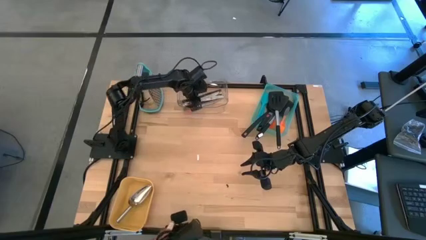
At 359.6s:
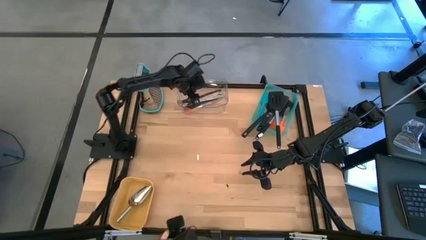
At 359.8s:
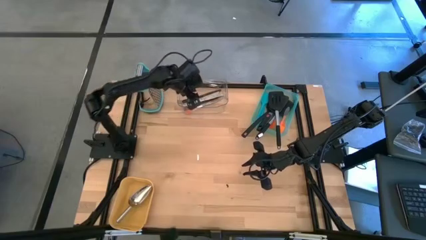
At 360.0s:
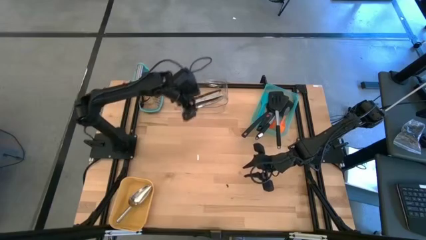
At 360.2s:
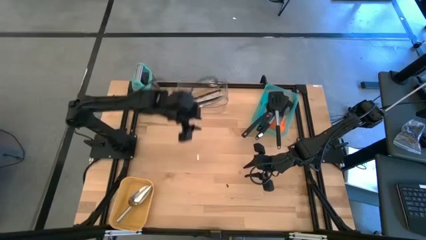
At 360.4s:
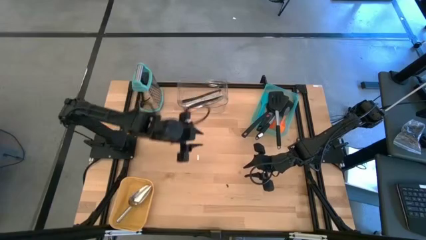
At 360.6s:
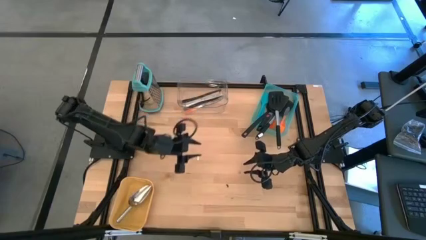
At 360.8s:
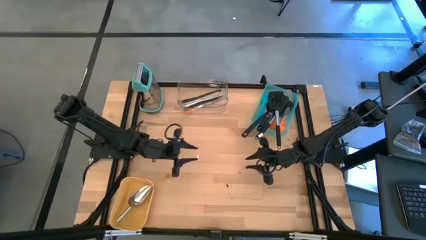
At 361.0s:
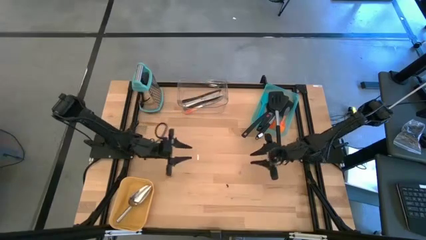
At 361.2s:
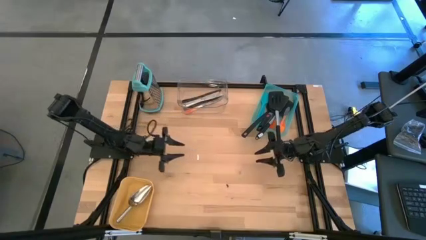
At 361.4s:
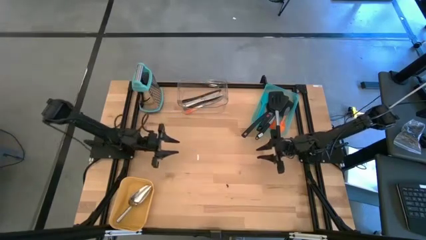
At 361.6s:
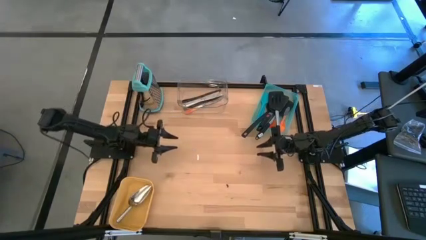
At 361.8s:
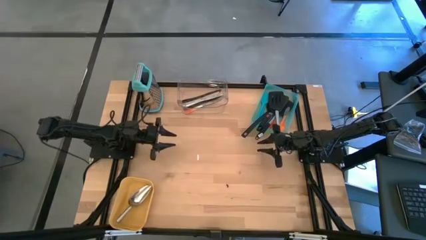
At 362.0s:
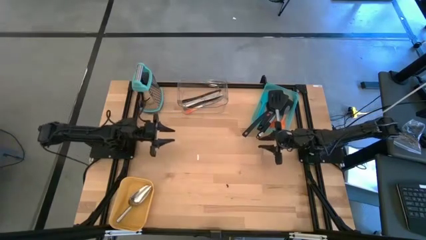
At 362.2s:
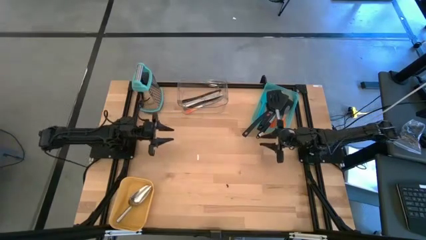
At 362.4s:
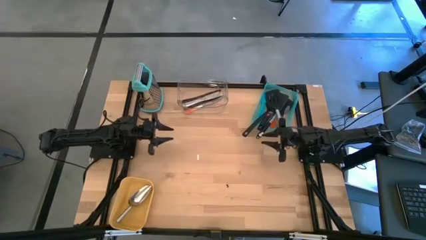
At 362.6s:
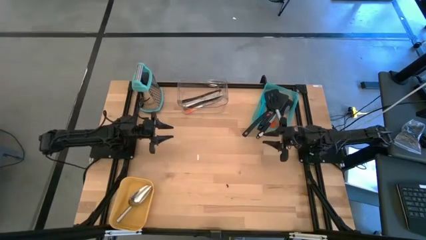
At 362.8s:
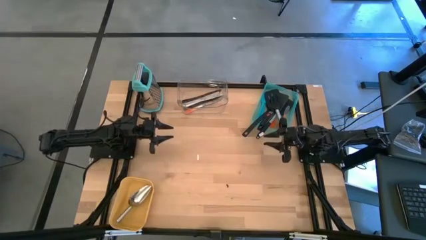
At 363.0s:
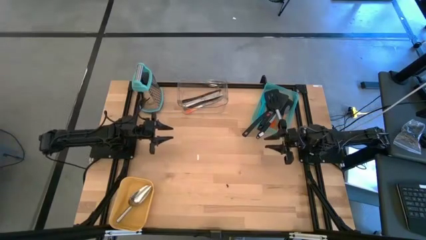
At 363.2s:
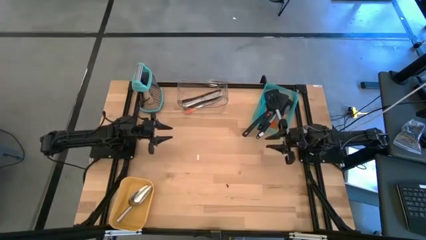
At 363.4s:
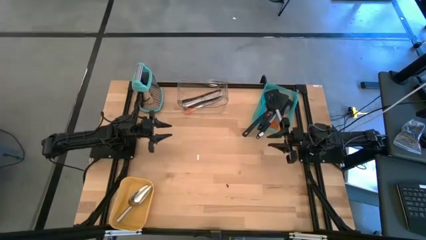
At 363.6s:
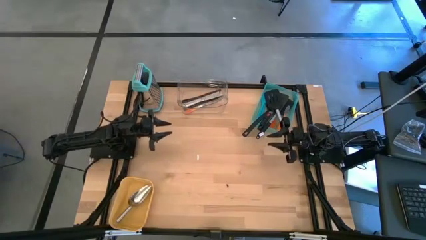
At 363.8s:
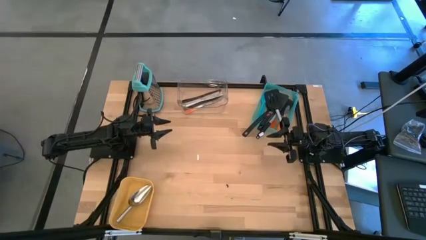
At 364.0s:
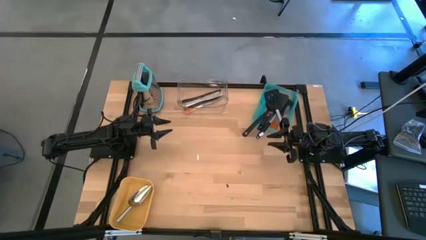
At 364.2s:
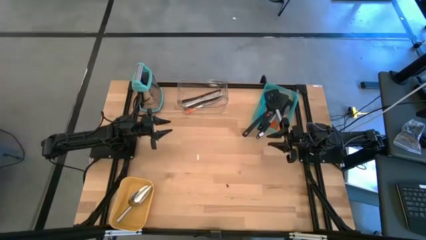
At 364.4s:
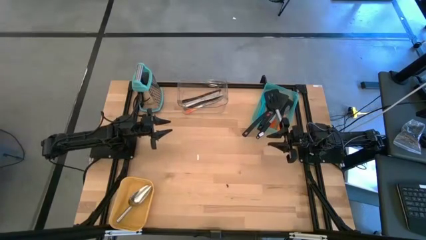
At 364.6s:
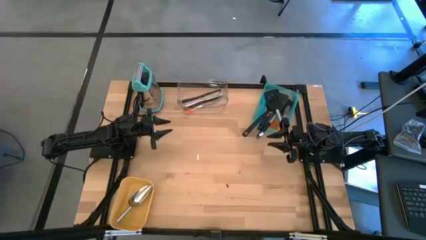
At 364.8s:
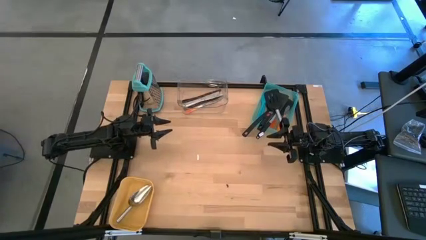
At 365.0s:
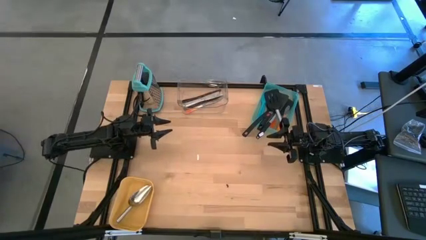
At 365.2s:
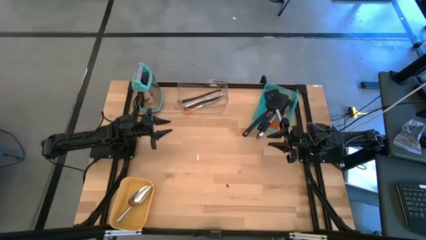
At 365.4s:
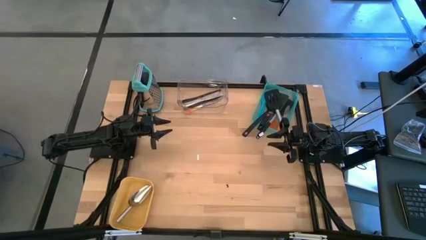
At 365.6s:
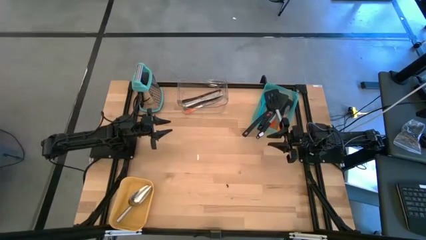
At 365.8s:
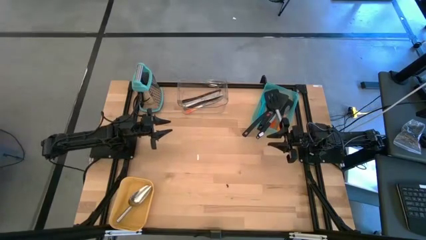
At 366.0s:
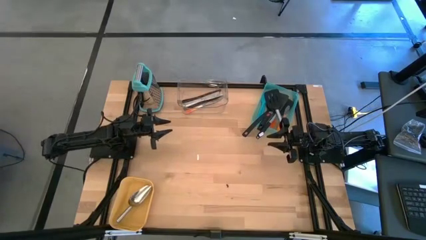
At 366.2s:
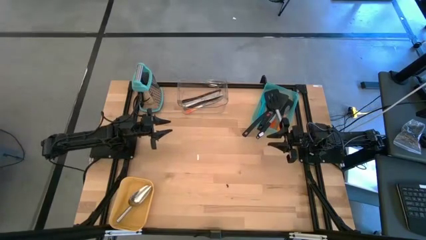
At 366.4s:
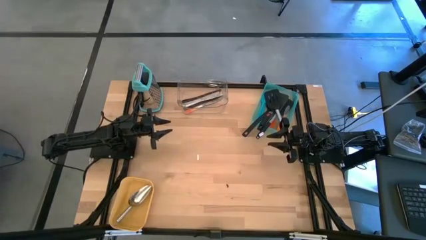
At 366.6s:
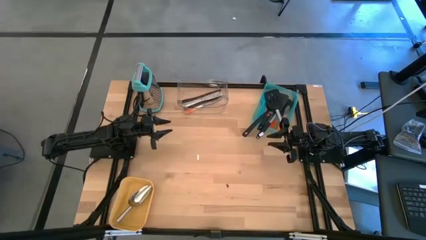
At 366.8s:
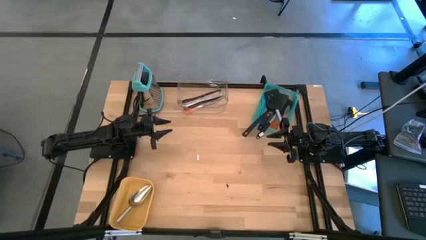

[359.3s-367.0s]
Task: Pick & Place Kitchen Items
Return to Home Position

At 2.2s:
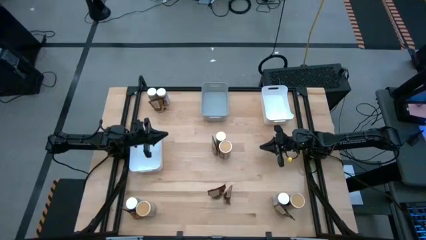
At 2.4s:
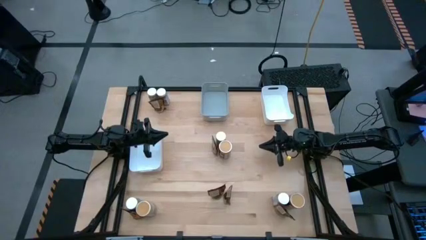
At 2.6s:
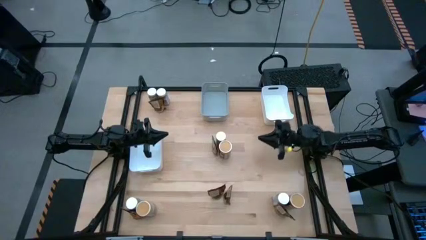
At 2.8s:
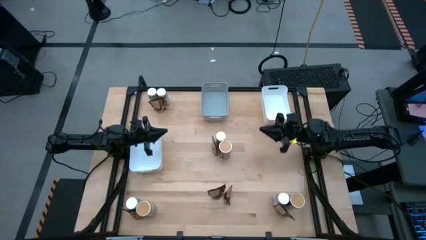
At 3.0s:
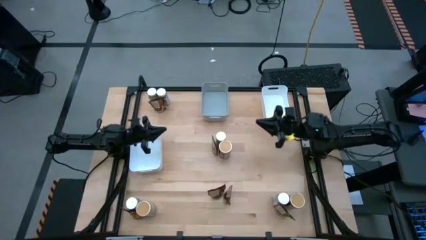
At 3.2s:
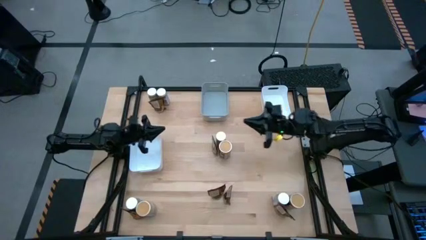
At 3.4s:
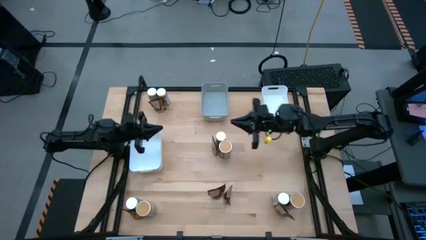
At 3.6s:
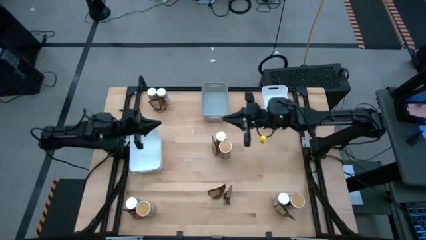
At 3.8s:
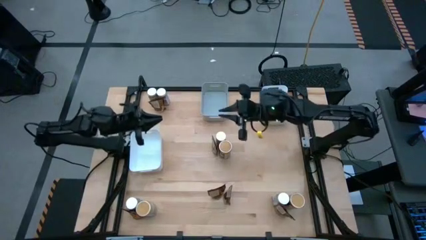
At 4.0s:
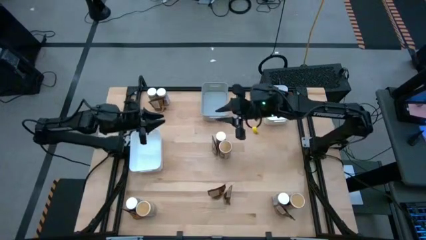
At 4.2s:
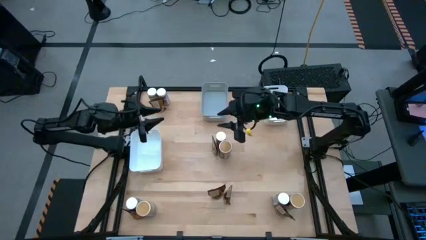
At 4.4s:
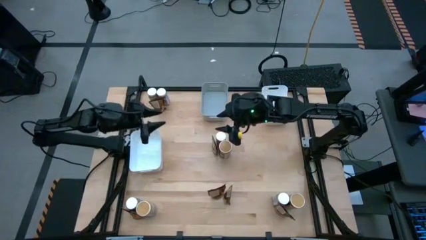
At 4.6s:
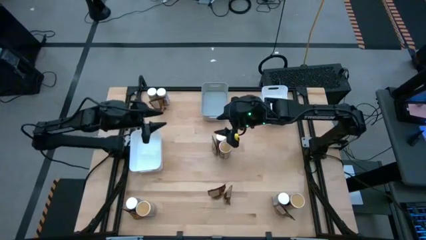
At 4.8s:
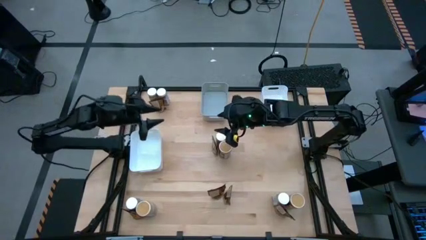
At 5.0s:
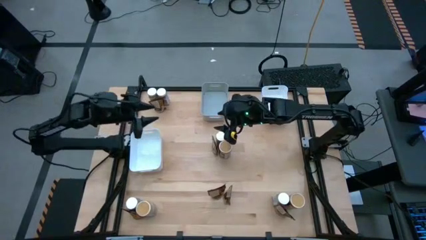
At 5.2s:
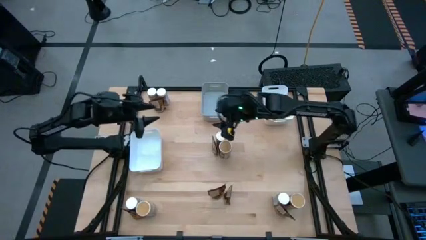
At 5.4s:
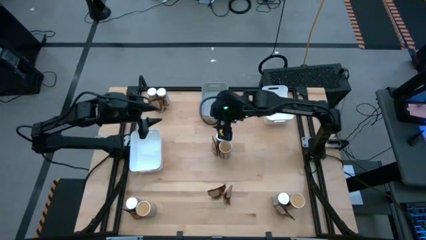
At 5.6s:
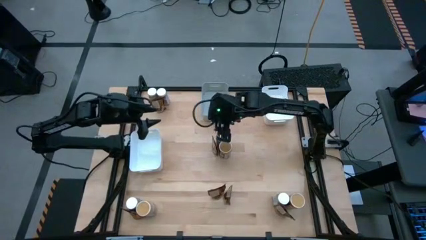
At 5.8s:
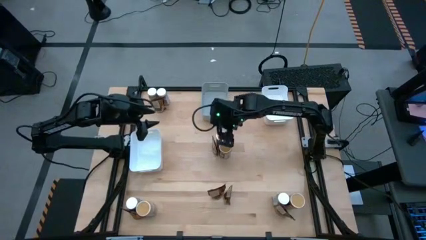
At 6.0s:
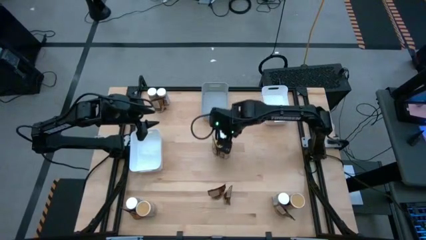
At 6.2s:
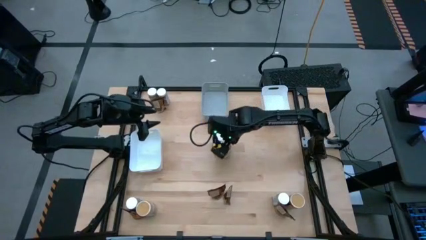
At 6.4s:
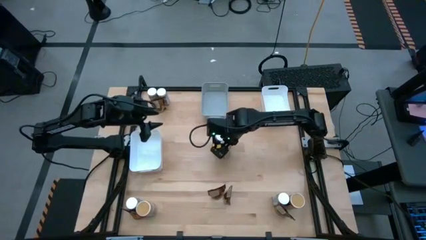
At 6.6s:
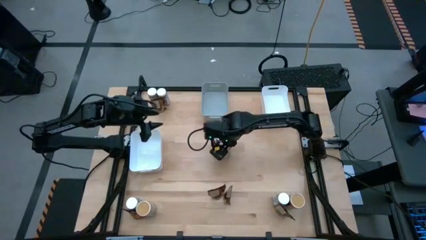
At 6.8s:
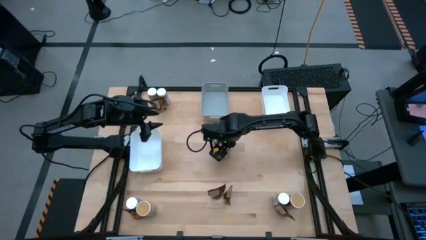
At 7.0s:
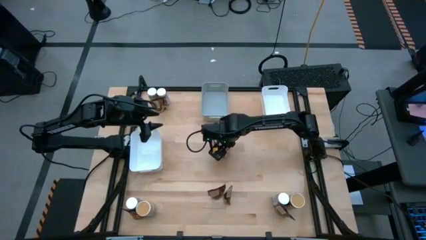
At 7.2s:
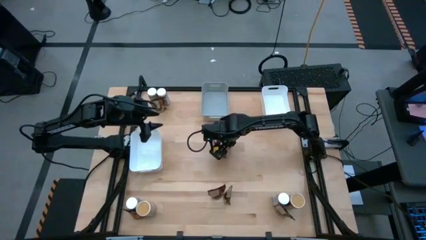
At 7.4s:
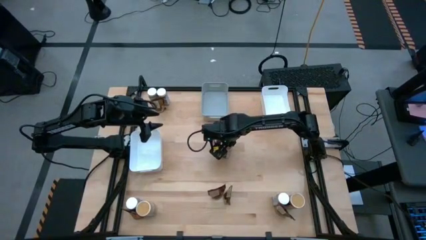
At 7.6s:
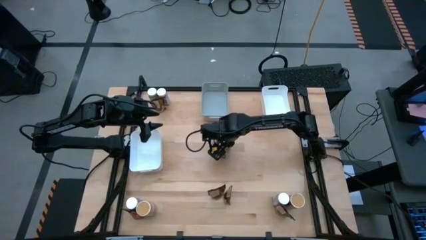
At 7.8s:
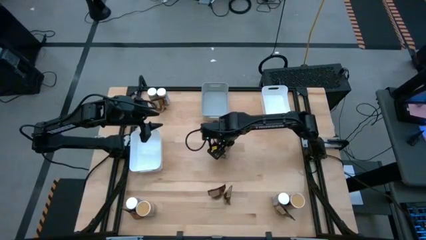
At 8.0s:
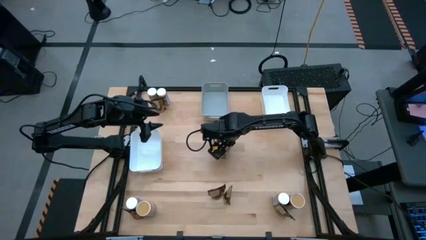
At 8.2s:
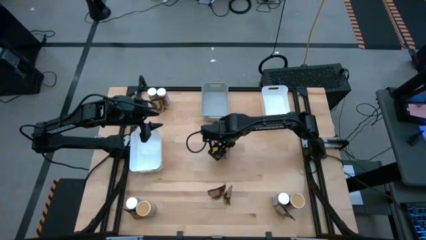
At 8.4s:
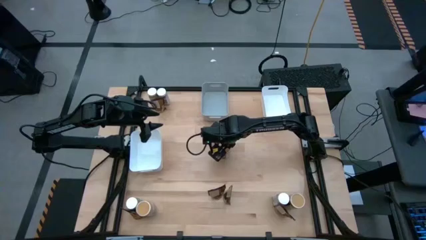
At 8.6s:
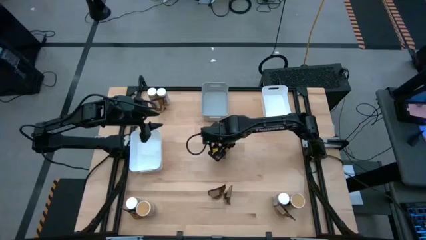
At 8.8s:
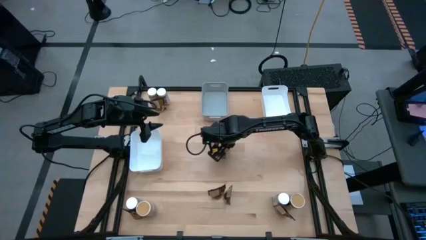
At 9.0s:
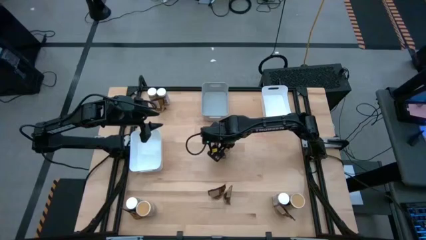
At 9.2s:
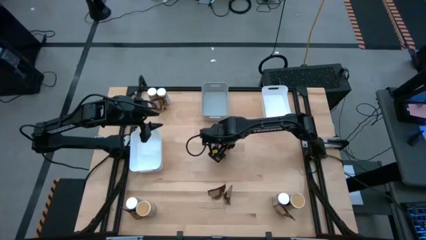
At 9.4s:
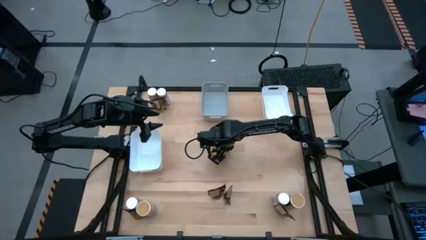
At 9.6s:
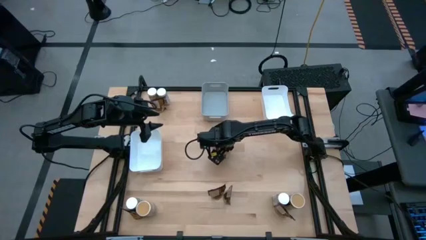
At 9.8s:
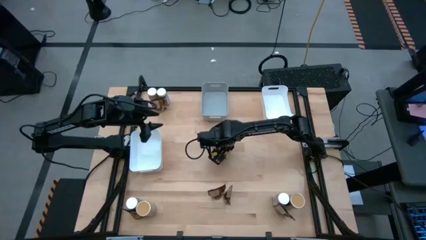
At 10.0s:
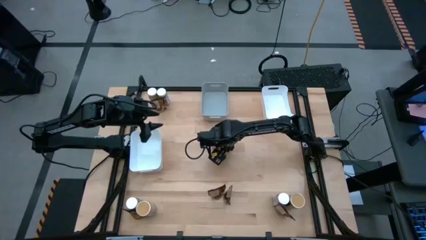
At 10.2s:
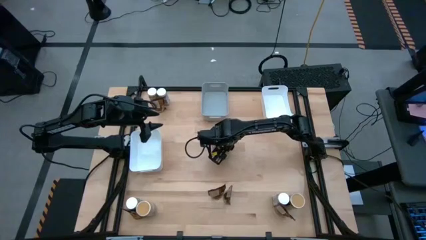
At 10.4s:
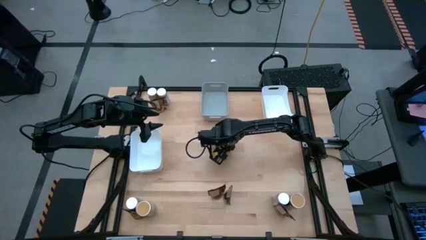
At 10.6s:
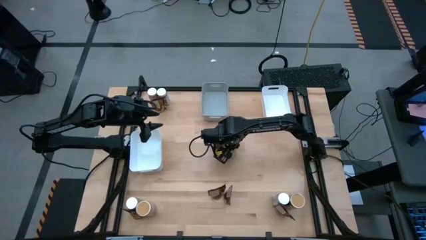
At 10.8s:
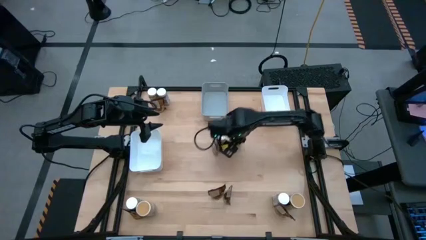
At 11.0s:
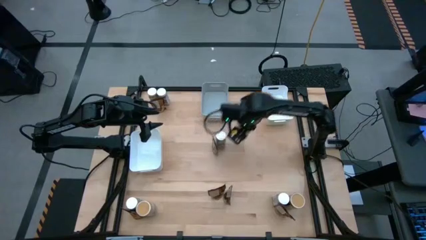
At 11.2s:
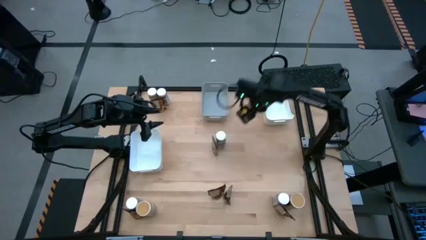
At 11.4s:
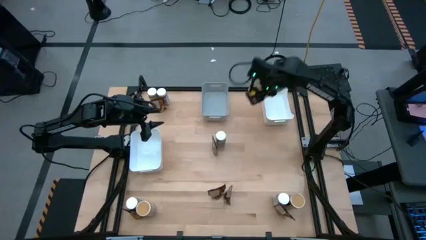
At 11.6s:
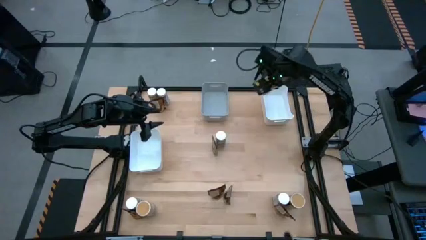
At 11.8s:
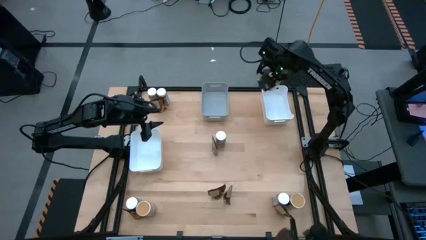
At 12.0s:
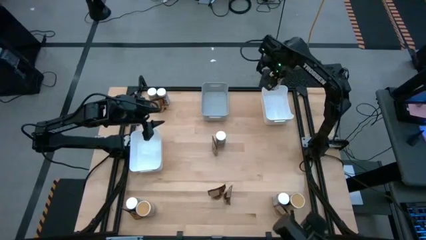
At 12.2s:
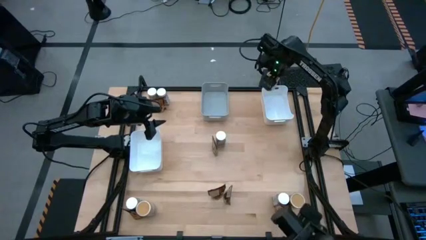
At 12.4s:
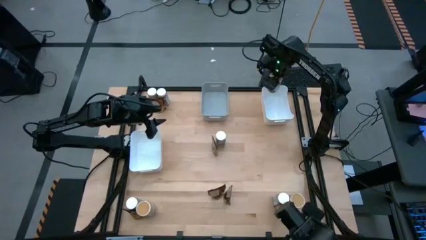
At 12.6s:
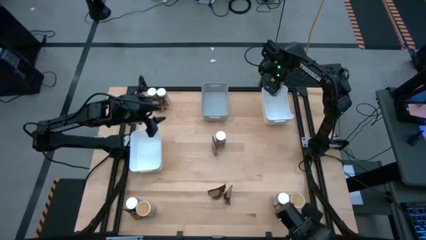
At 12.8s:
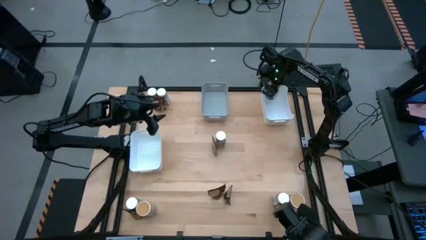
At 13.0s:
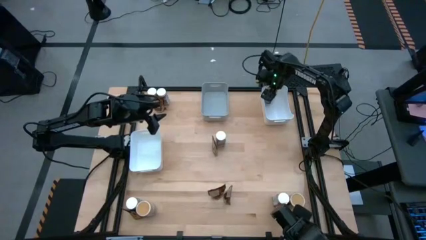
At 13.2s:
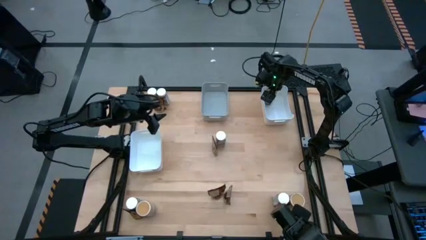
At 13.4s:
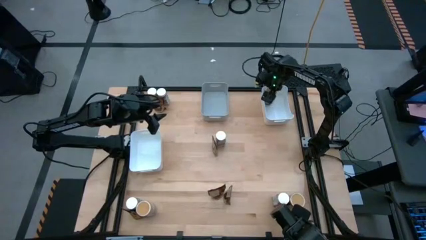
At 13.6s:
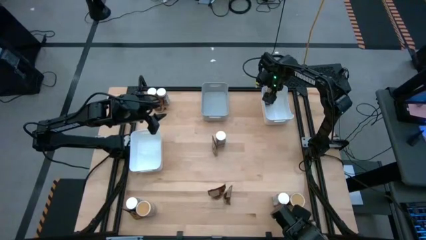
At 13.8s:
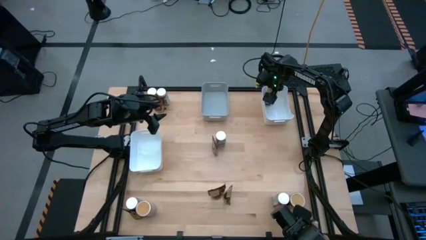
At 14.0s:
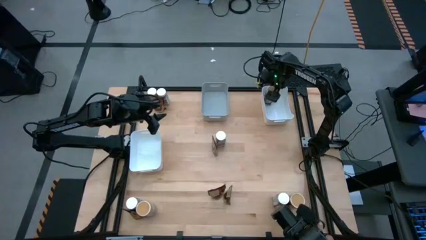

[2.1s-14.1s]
Task: Sort spices by type
Put the top gold spice bottle into the top white bin
